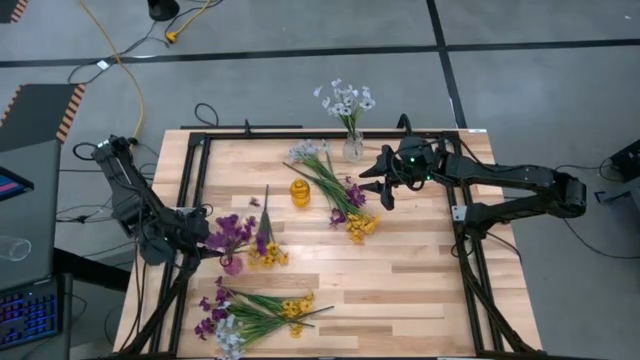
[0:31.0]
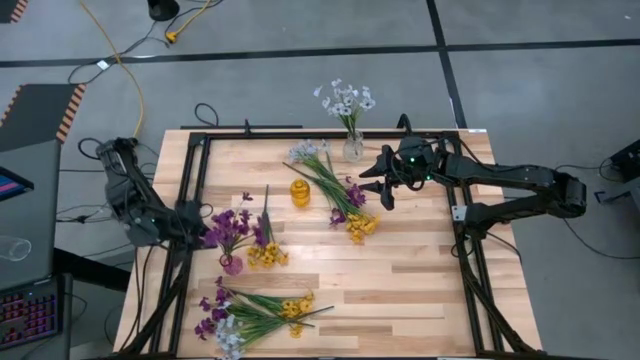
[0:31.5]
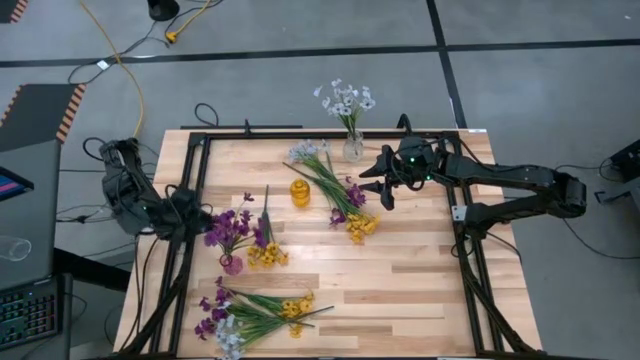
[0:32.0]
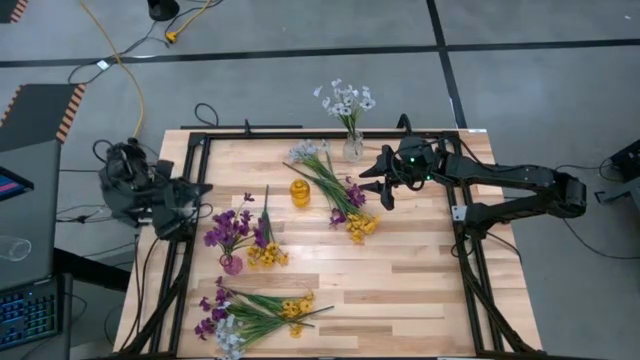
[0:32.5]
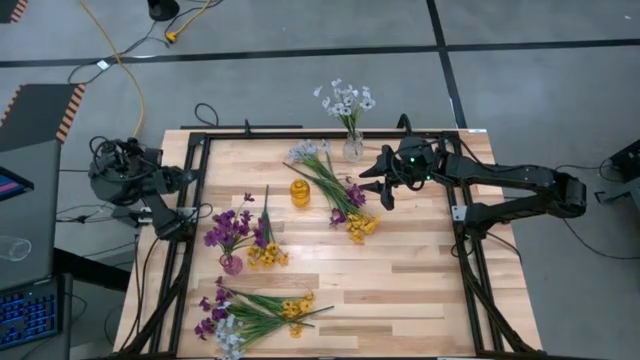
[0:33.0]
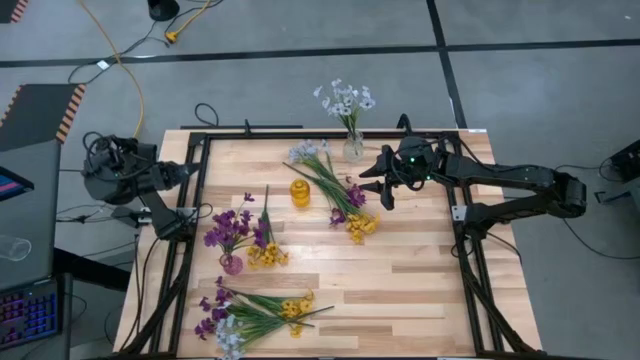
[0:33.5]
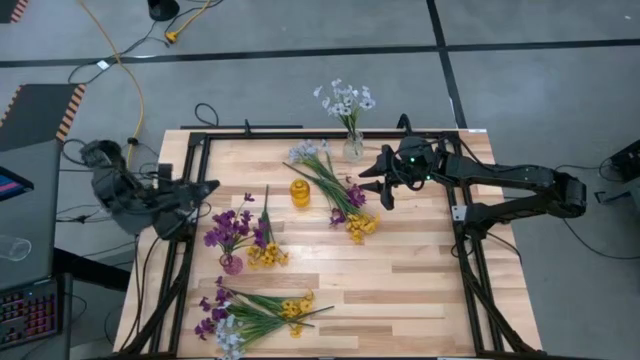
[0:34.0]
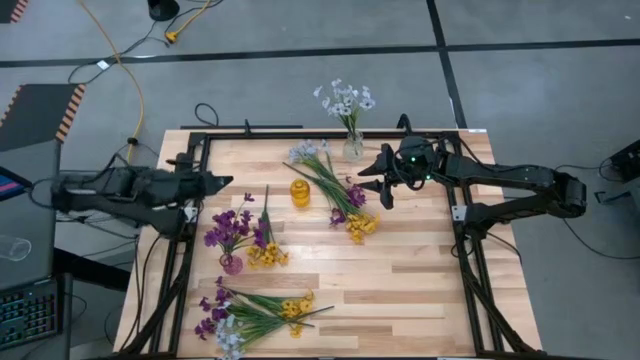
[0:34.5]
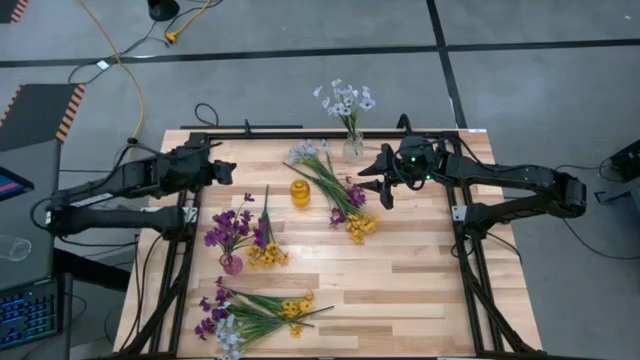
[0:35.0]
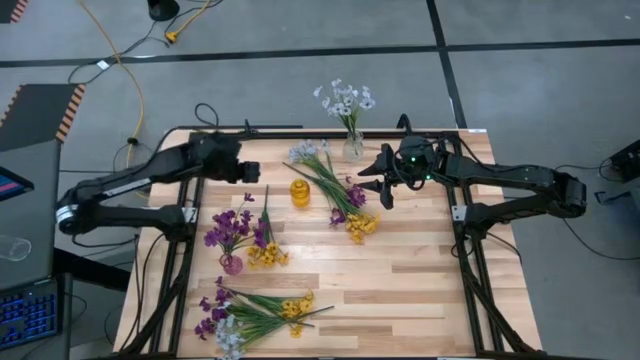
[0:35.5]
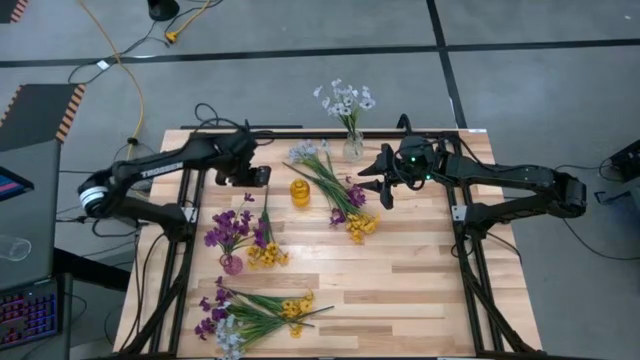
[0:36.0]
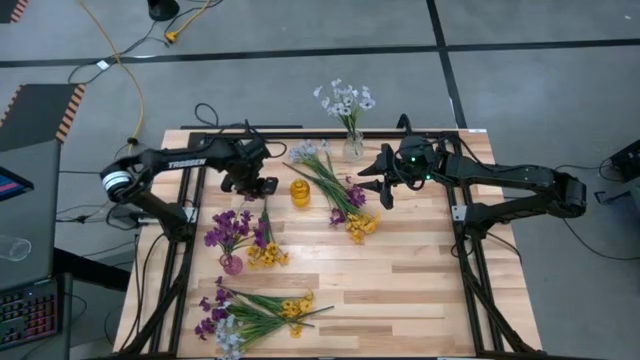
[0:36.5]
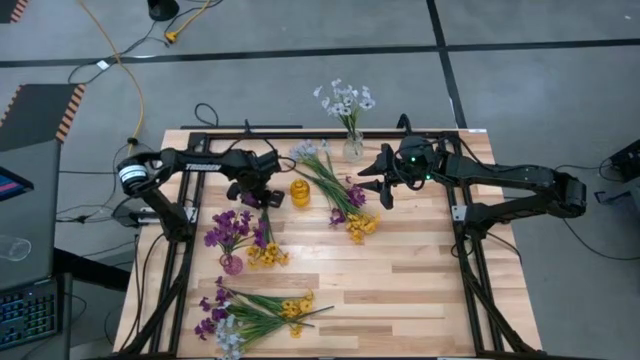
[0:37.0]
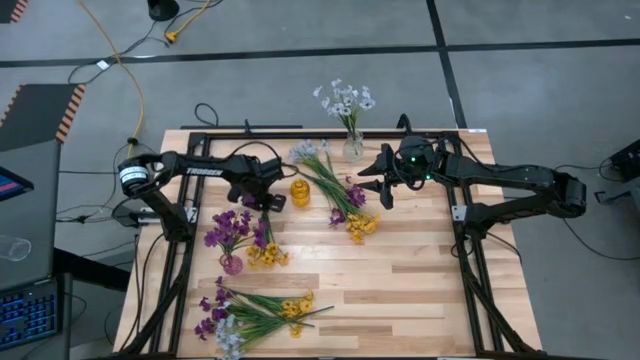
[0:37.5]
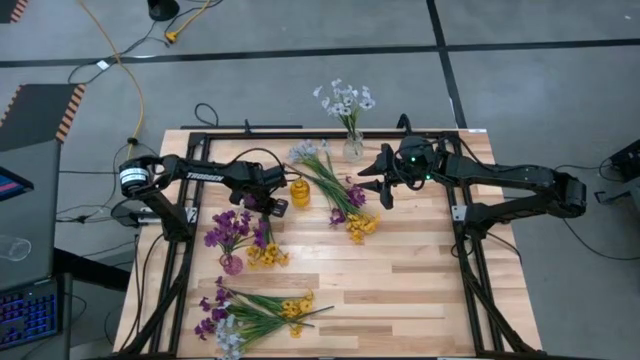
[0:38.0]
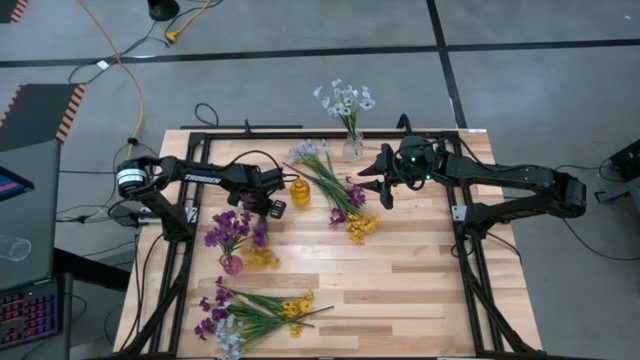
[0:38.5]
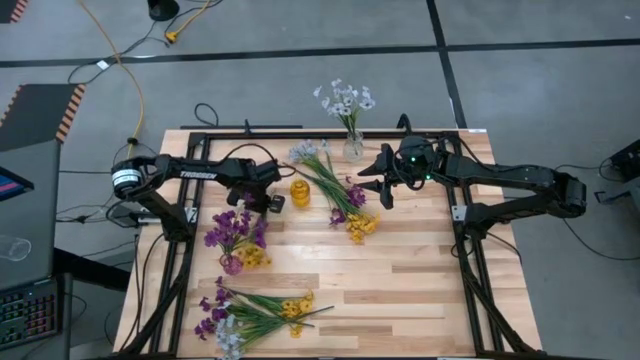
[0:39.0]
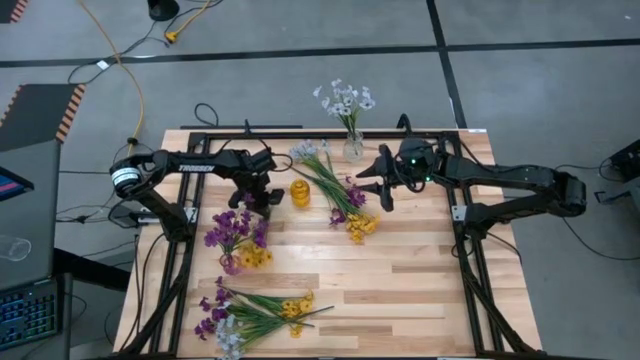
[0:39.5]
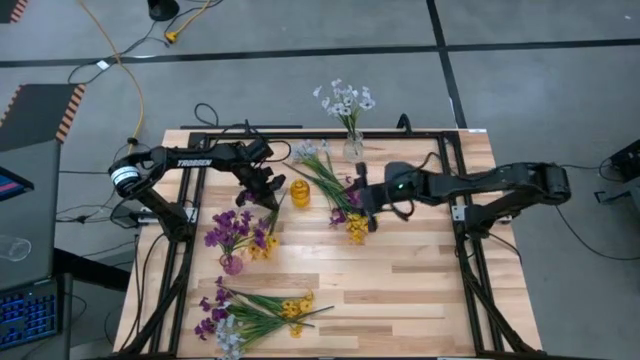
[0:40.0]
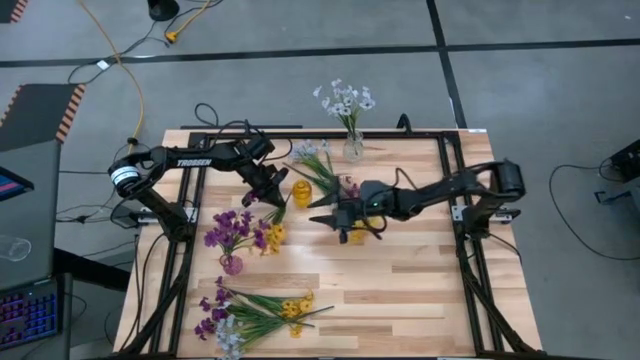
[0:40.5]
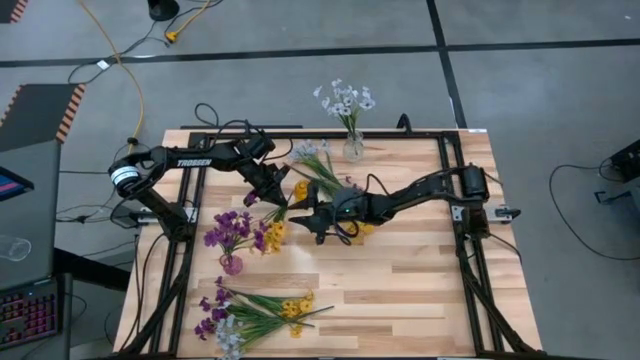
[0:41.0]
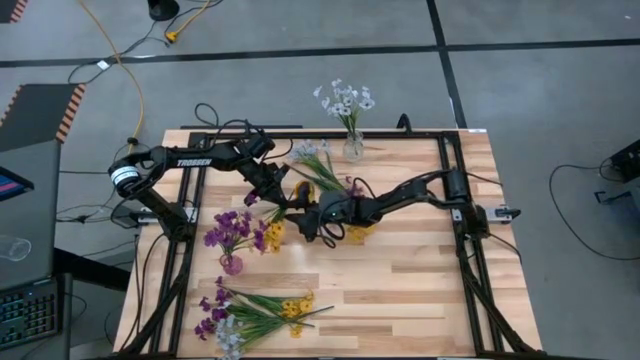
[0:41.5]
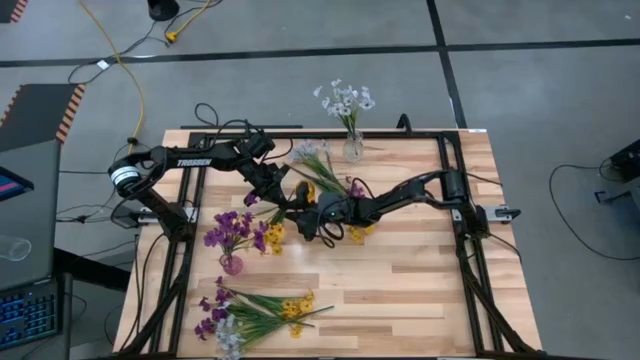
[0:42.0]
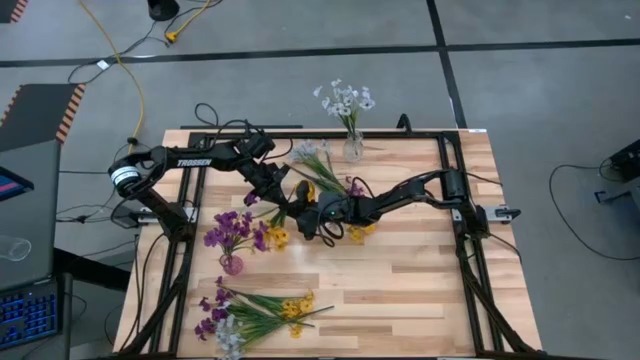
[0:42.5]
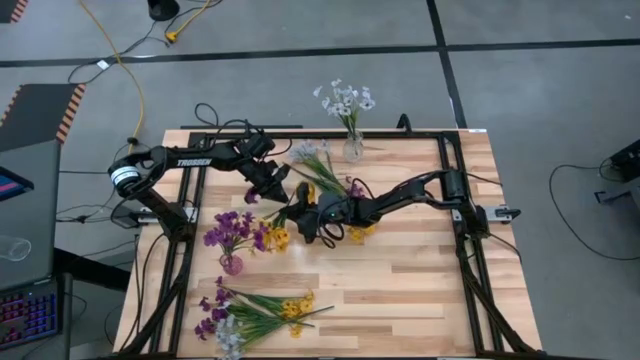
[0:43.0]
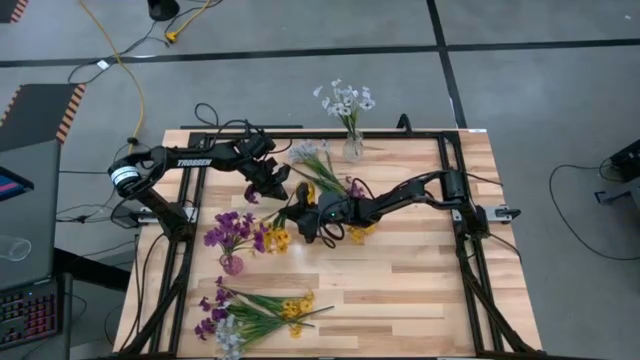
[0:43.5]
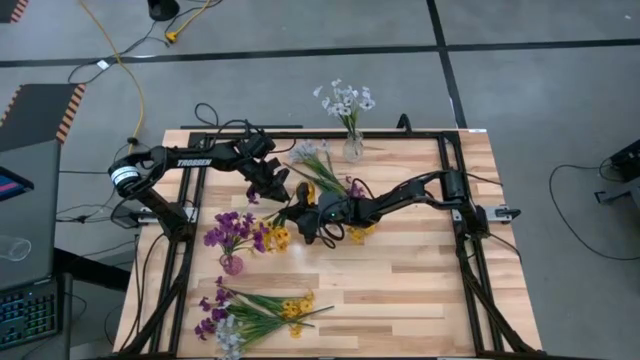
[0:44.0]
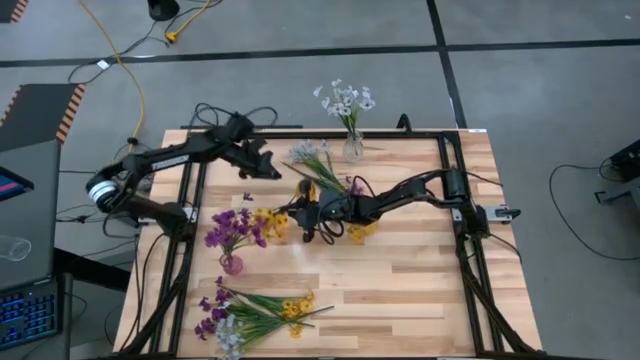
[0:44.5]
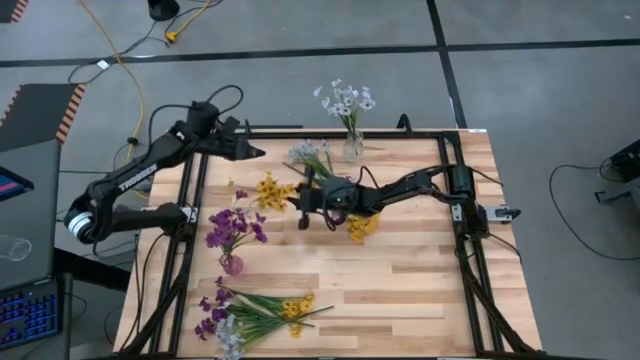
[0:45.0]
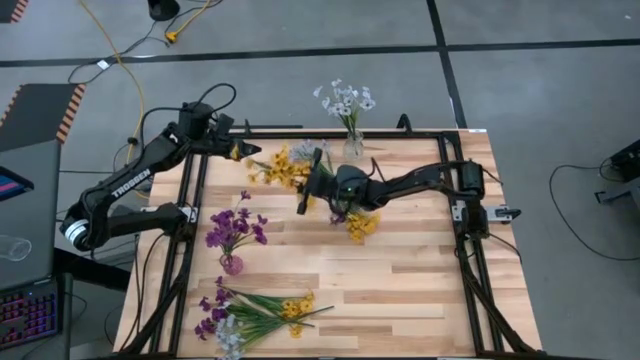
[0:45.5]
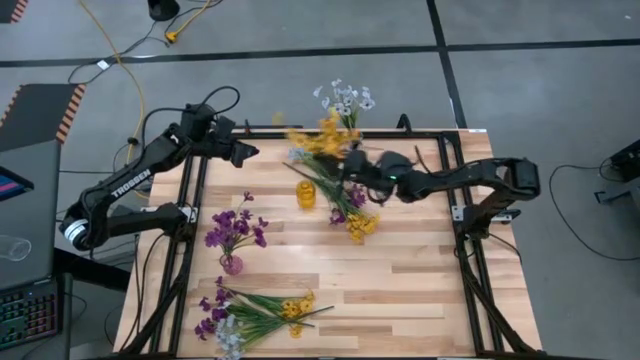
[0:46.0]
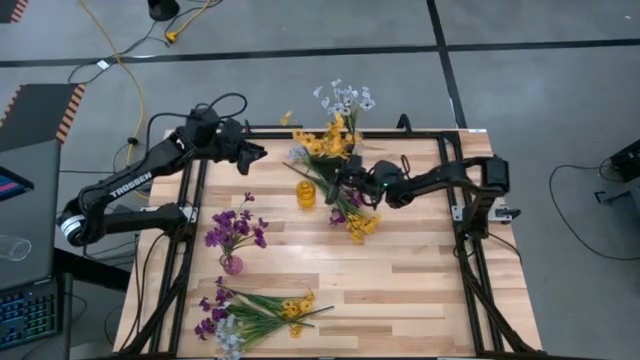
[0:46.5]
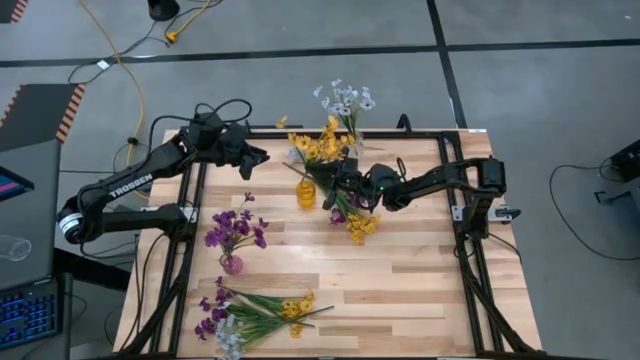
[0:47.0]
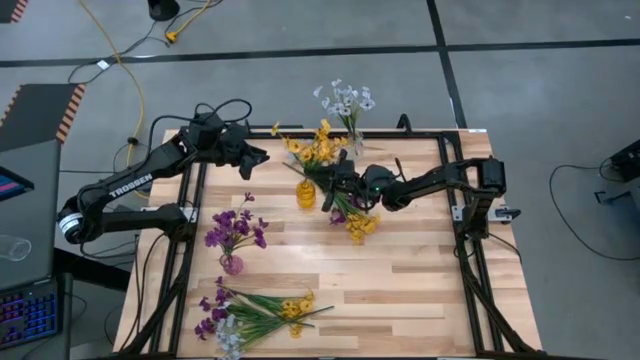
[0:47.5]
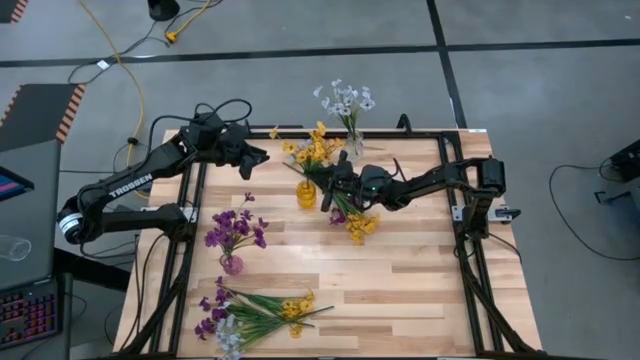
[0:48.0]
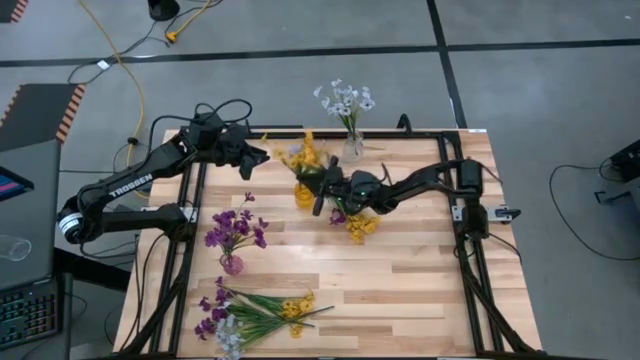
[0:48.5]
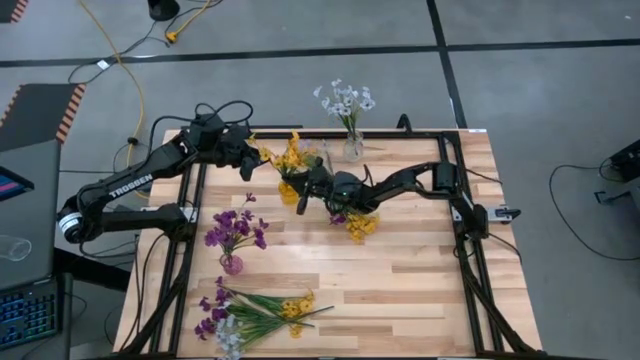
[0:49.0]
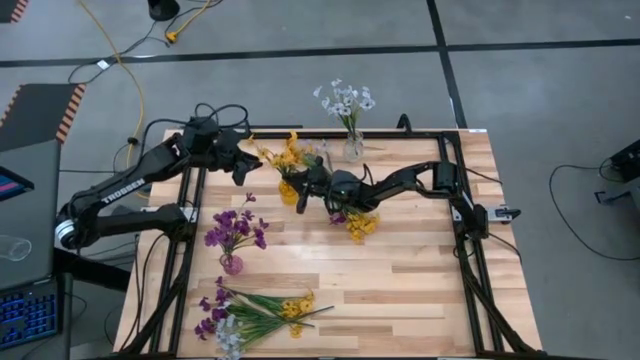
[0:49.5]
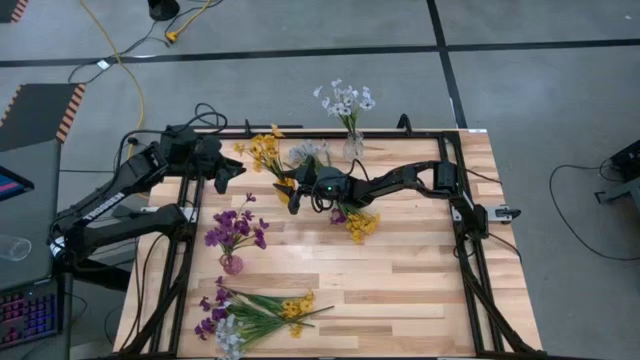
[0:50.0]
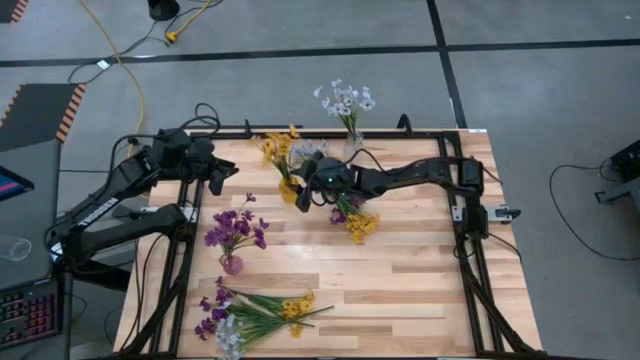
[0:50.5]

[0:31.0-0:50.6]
Task: Sort flowers into vase by color
Put the top left yellow flowers into the yellow vase
